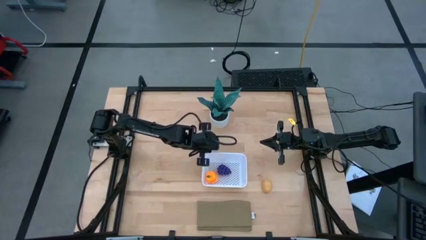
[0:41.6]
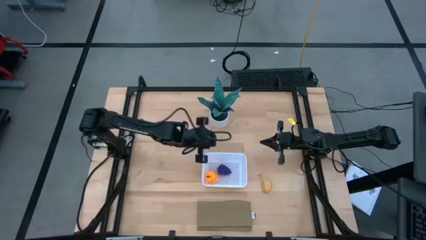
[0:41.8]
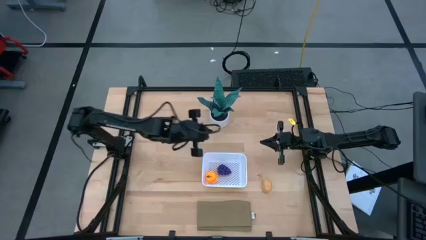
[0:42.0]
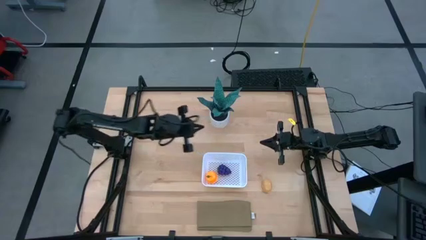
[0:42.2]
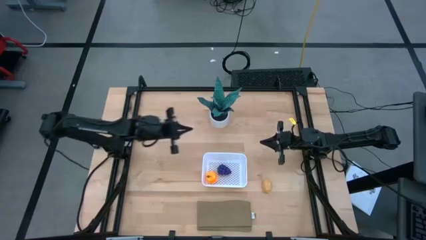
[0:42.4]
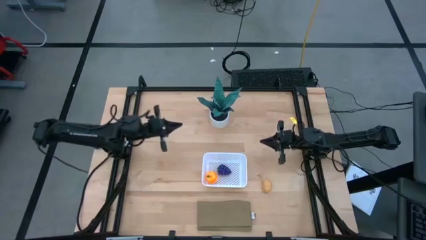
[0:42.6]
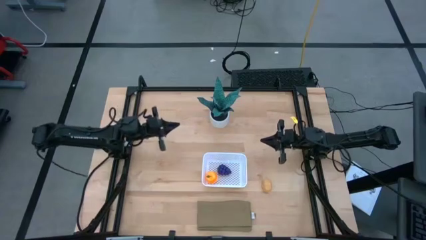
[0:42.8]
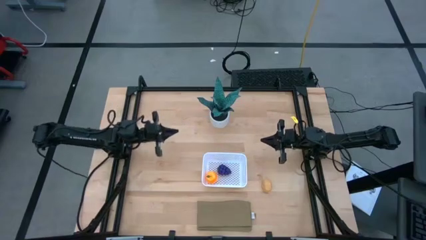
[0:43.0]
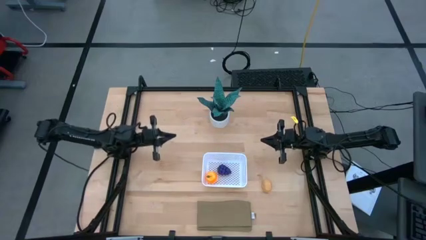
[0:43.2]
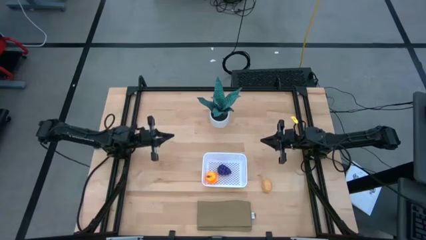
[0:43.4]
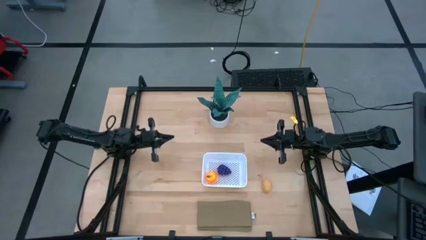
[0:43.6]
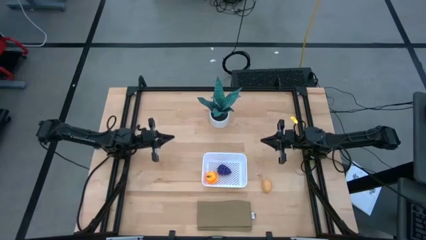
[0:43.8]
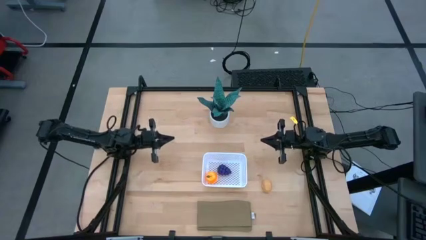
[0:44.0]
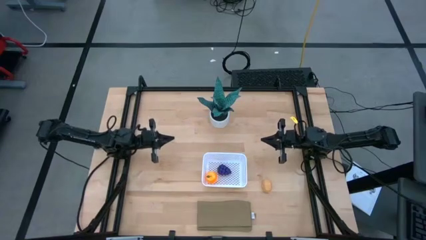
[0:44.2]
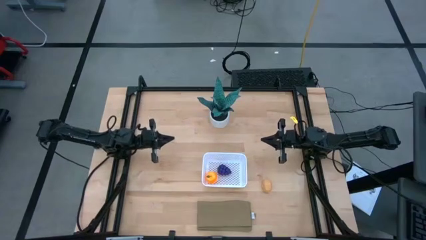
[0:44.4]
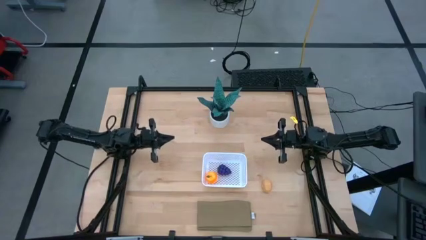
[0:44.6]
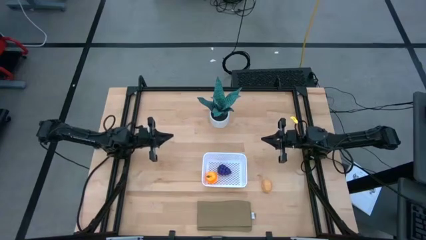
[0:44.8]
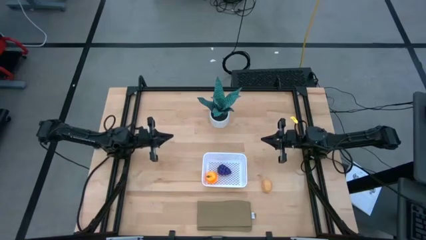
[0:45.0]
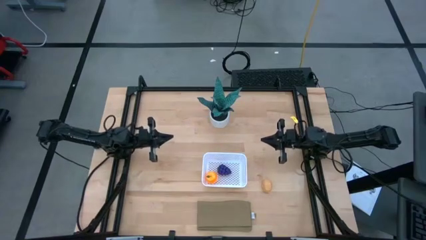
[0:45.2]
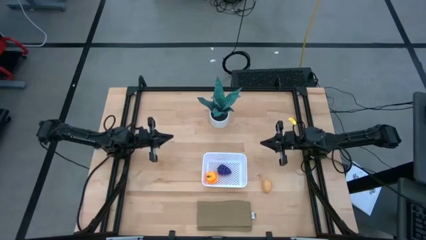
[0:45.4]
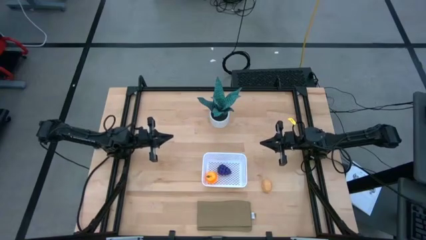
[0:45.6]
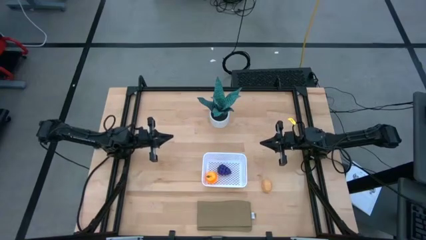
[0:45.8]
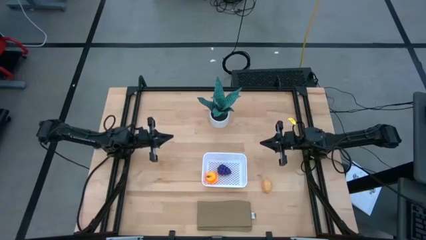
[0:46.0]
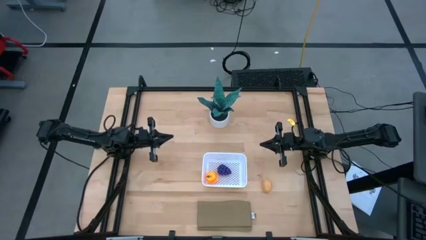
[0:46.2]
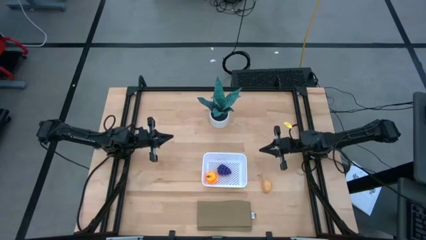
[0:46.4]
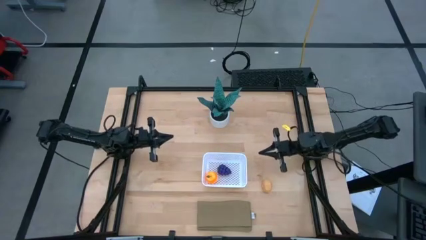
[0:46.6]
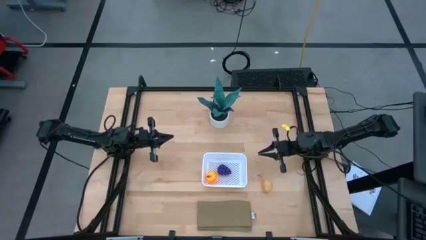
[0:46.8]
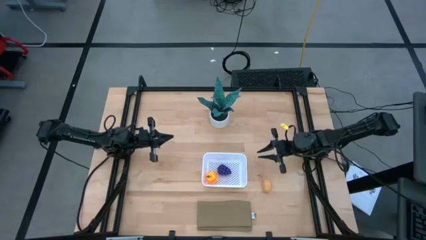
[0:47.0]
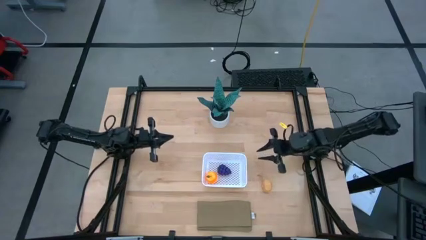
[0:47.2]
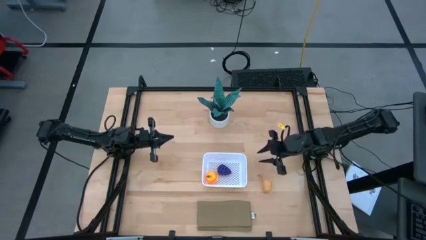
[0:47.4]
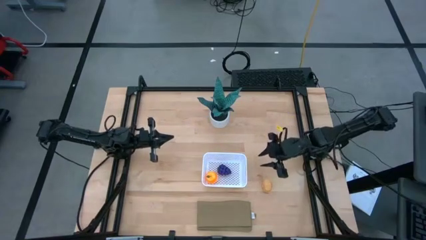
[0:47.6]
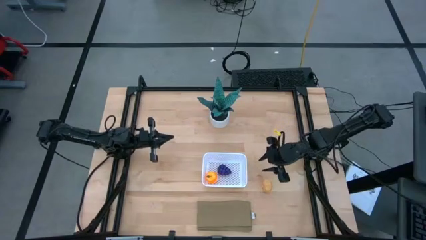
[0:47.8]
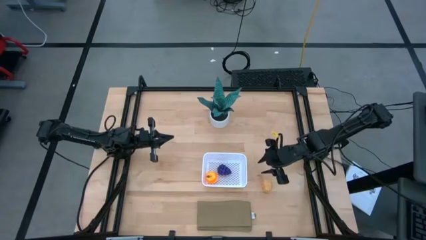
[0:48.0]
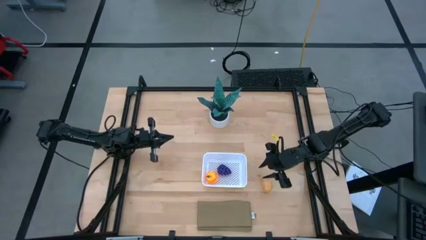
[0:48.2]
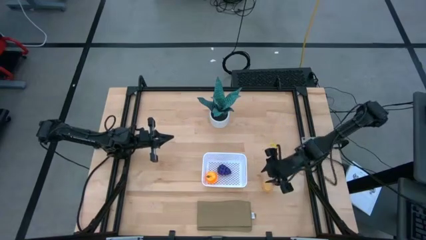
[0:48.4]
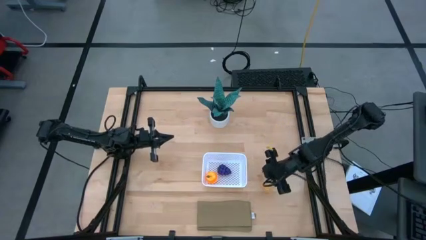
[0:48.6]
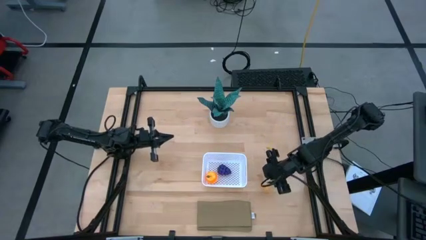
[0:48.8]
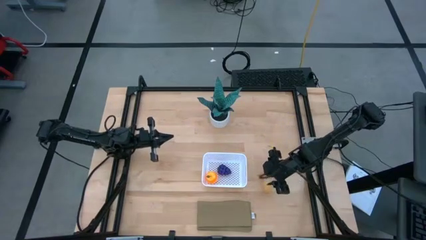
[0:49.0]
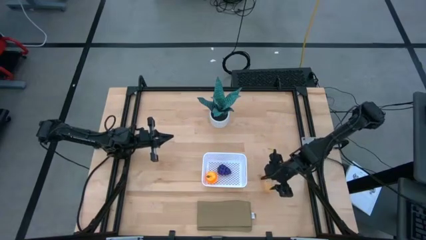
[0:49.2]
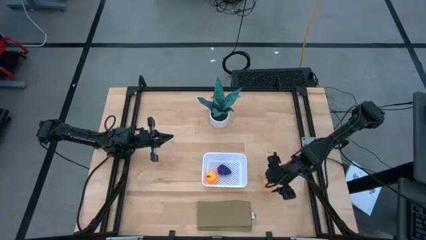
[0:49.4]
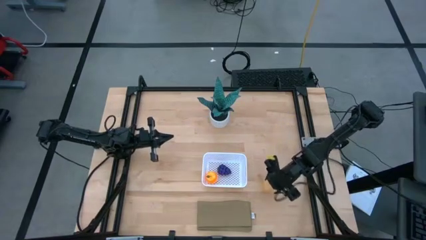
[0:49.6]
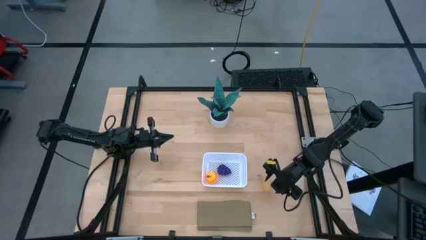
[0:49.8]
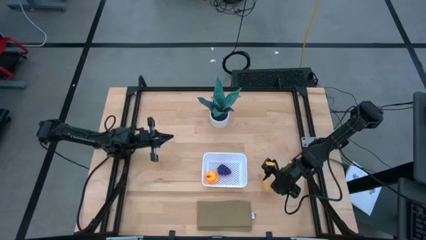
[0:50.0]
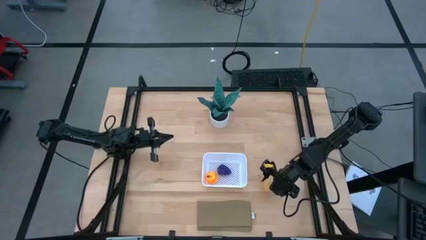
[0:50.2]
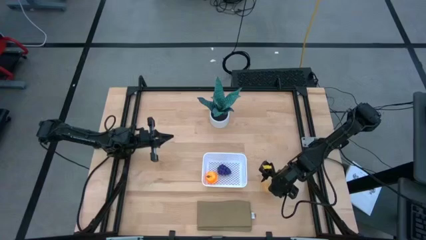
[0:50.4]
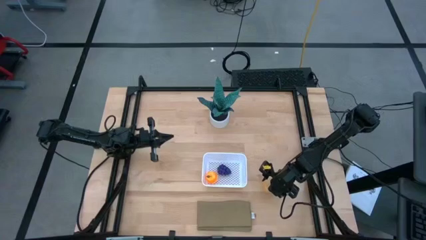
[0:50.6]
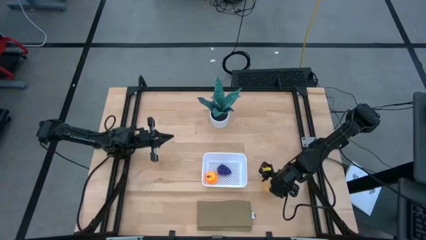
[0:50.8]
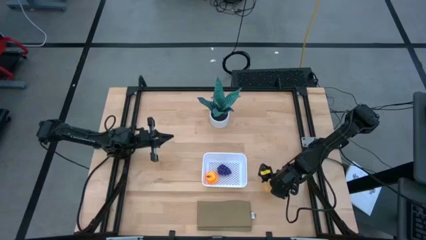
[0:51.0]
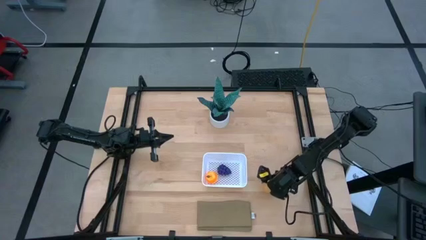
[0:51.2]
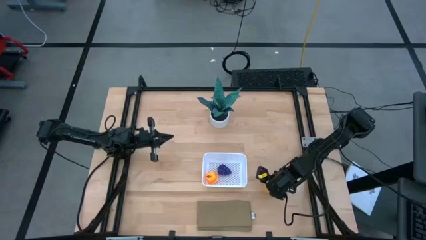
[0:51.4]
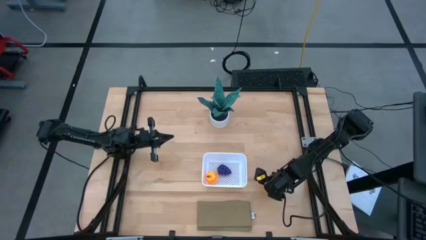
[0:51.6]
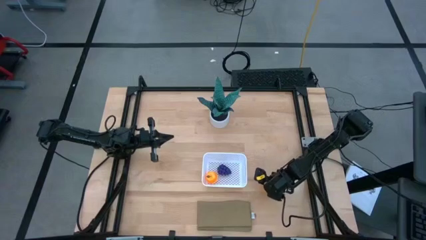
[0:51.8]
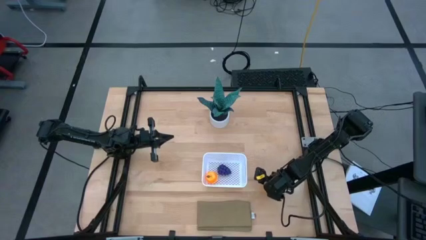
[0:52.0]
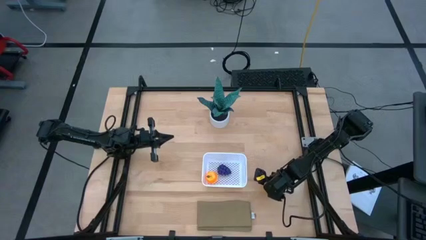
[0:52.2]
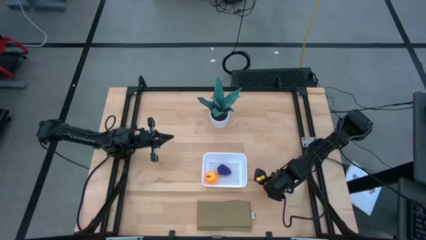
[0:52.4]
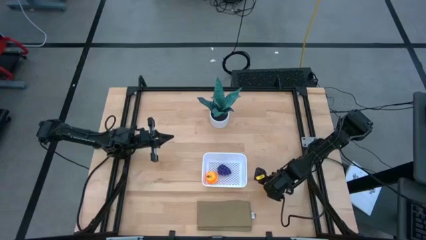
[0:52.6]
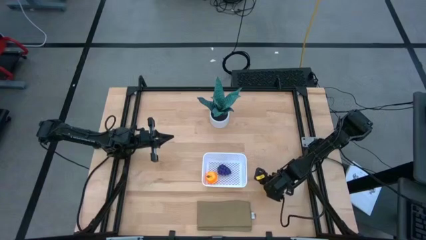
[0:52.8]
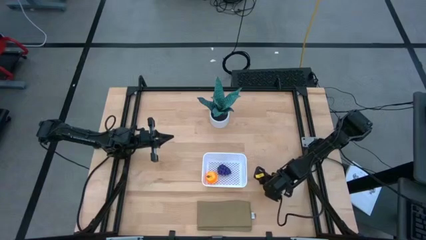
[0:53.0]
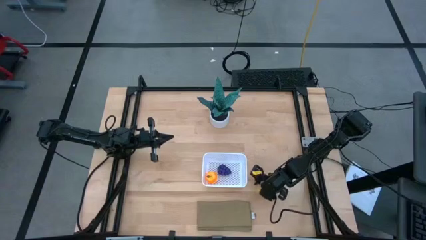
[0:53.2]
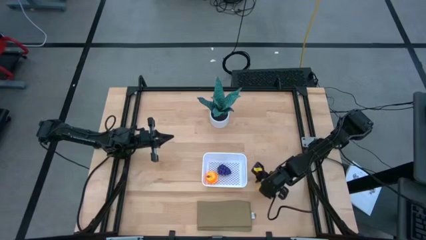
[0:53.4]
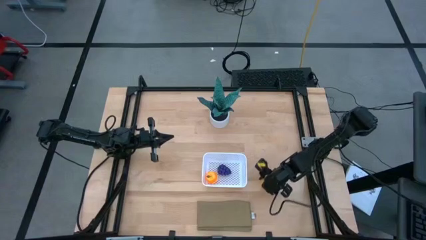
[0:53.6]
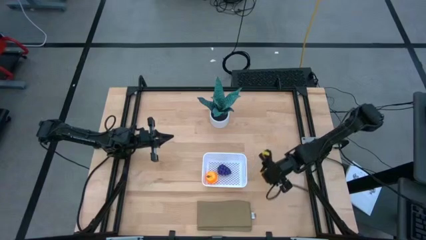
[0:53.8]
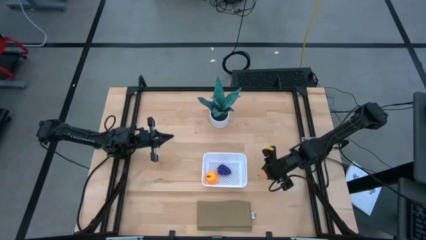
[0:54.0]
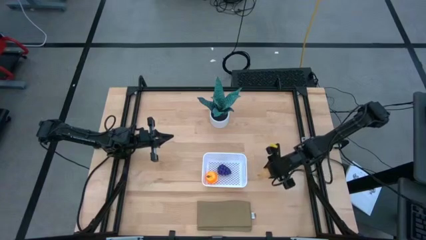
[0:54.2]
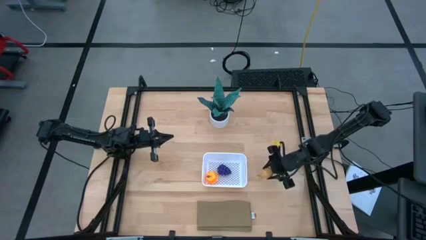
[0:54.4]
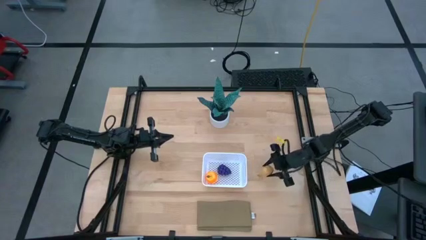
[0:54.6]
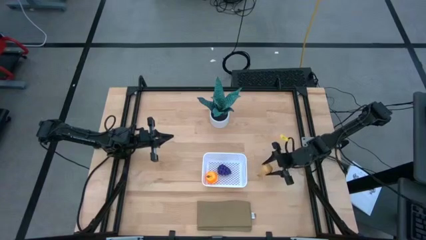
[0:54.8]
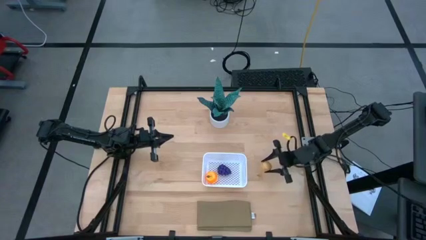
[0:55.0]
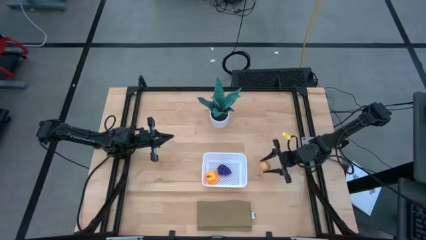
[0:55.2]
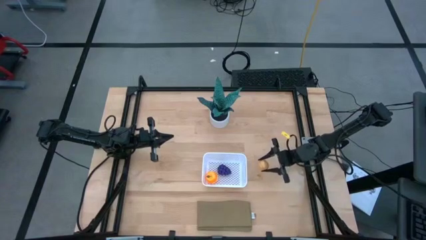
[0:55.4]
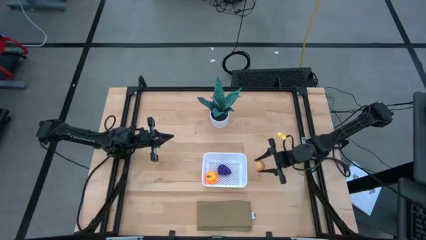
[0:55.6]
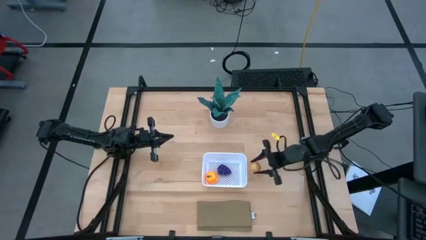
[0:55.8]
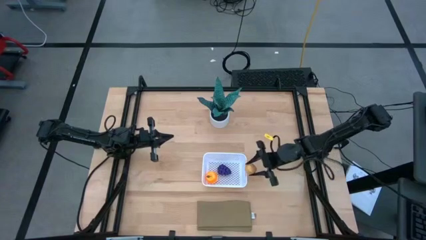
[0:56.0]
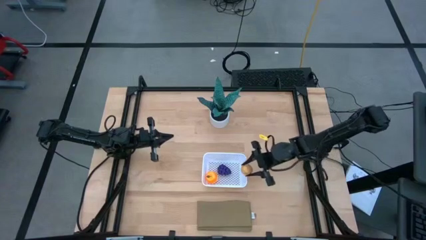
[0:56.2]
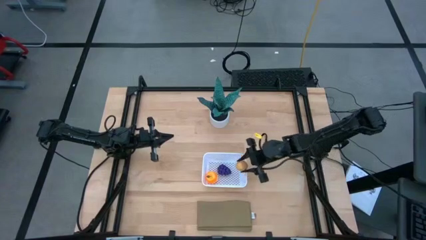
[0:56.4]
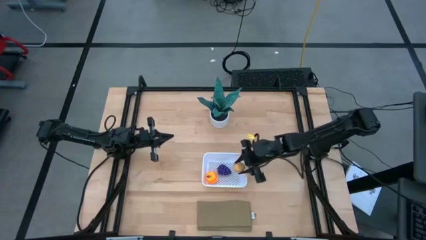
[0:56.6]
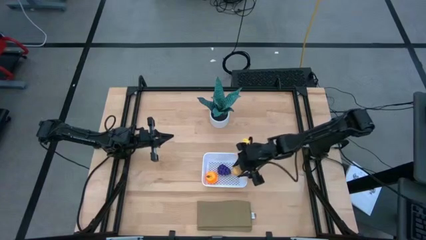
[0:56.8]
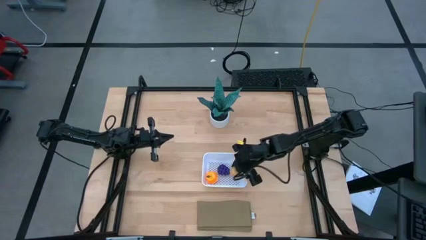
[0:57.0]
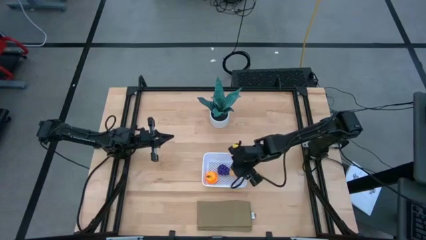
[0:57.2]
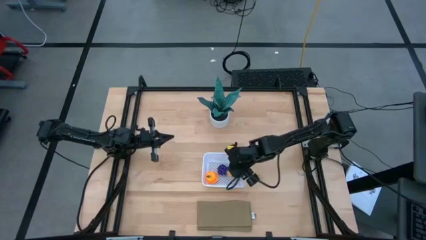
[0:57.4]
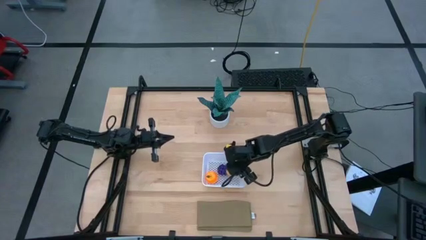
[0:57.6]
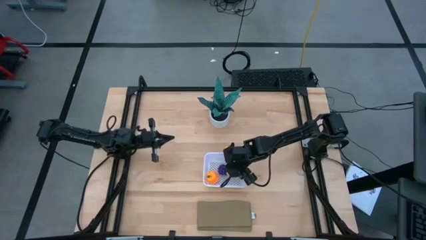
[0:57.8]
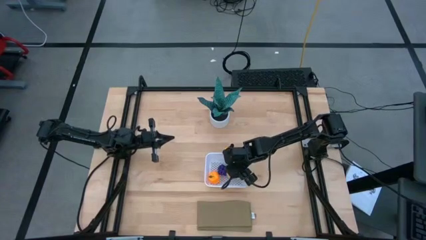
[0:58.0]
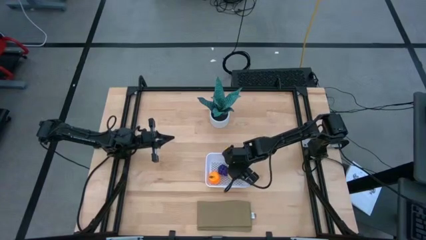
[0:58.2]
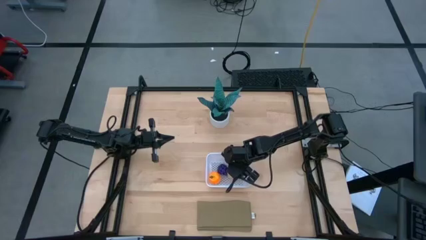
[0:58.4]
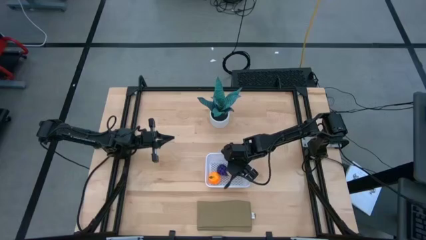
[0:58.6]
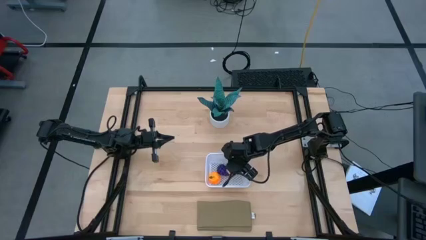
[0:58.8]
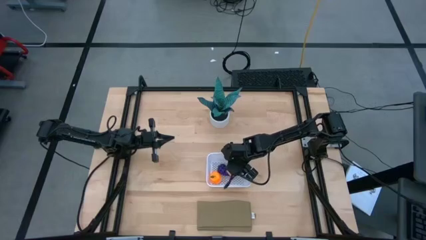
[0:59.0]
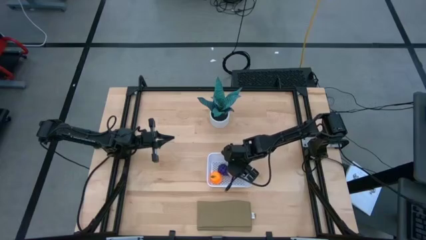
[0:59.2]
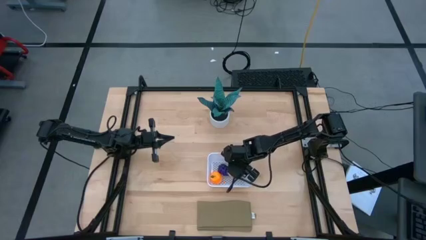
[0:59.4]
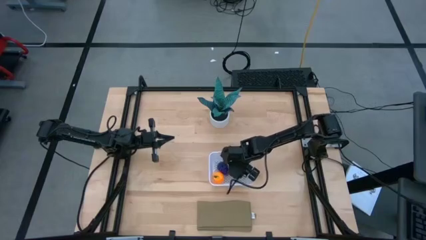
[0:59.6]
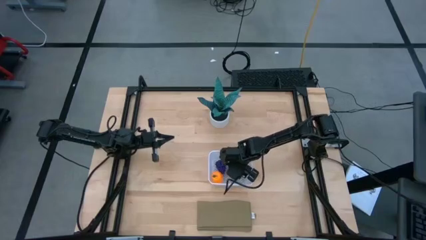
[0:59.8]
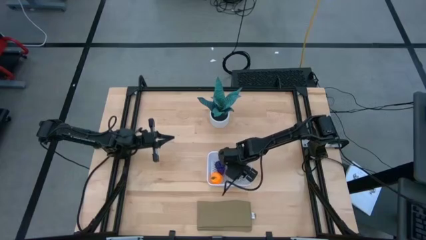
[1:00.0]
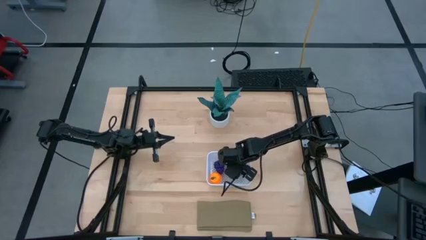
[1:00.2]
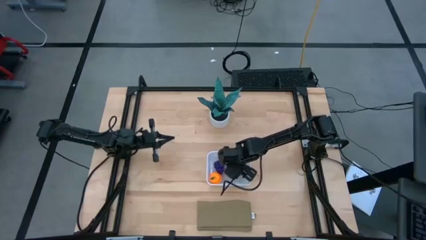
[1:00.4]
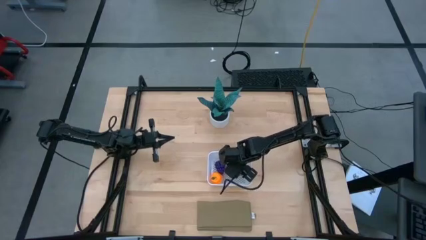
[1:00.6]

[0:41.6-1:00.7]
Task: Pick and placing Produce into tupperware
Put the brown potato into the white basket
